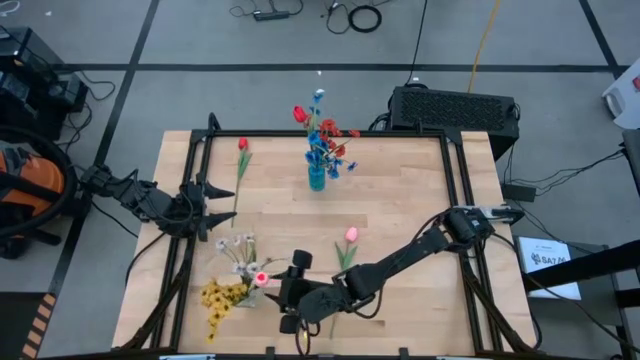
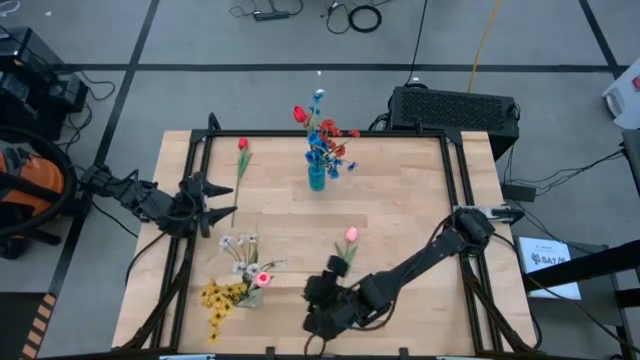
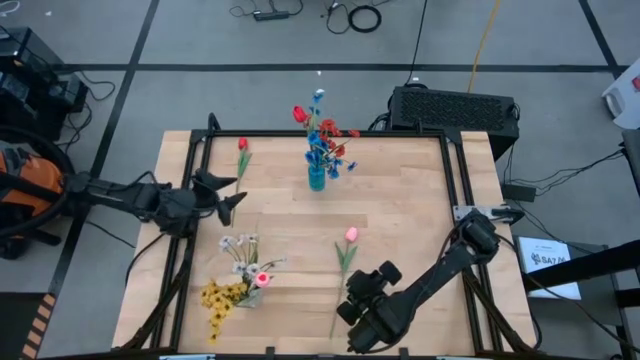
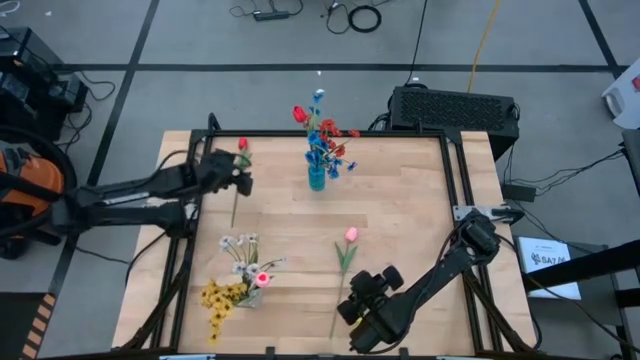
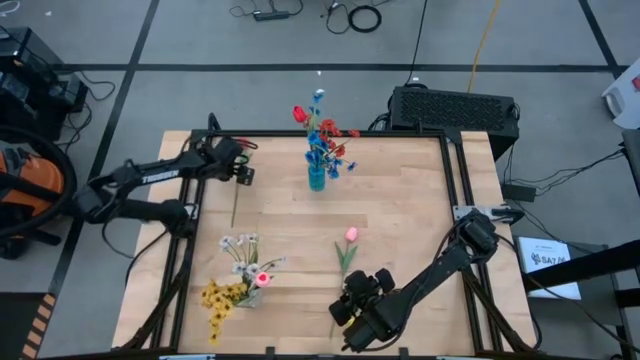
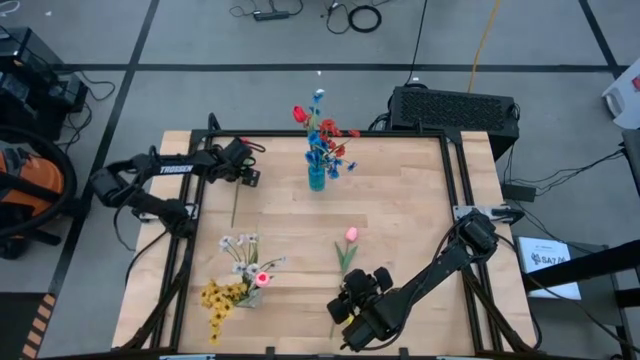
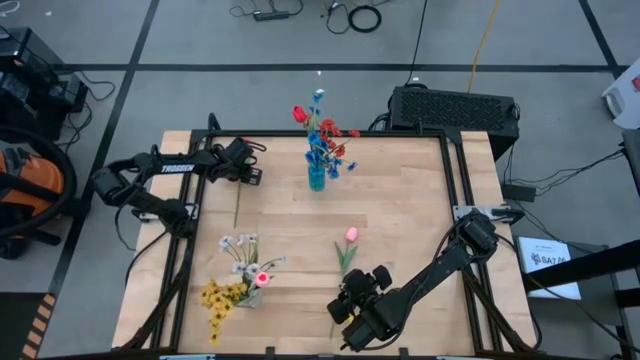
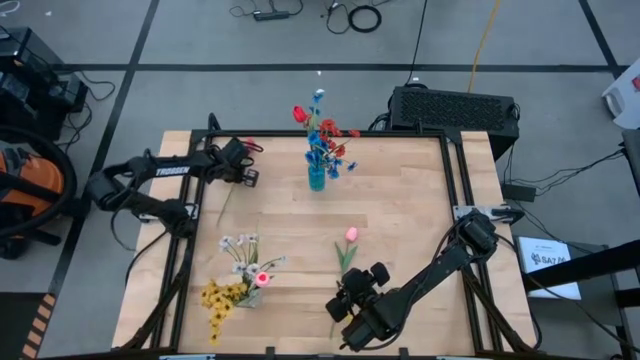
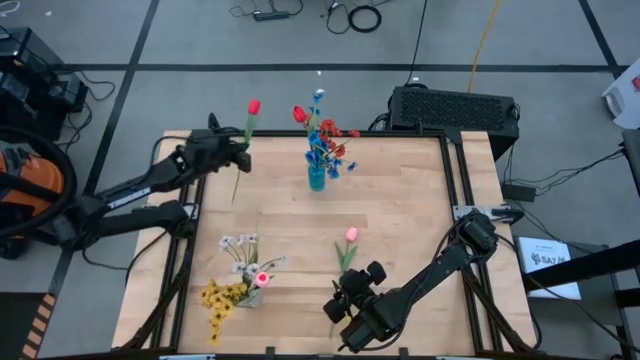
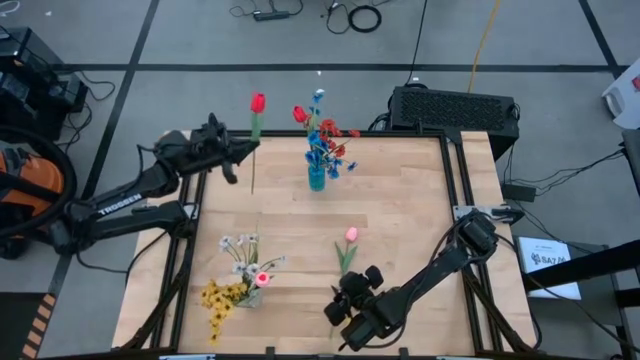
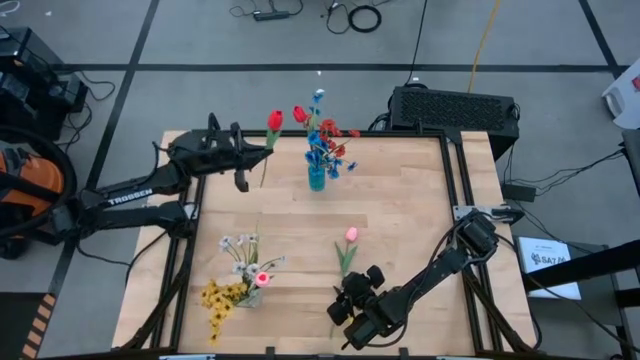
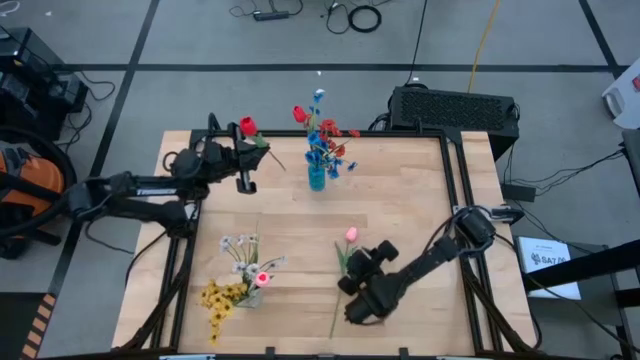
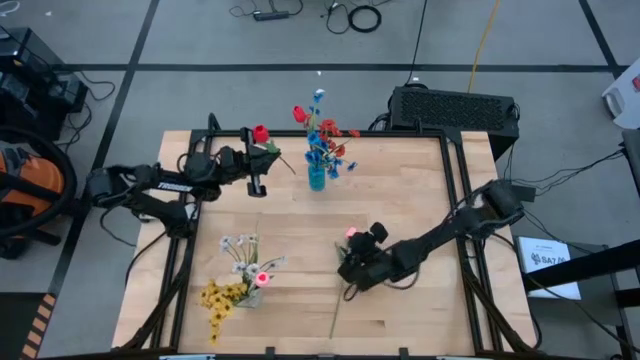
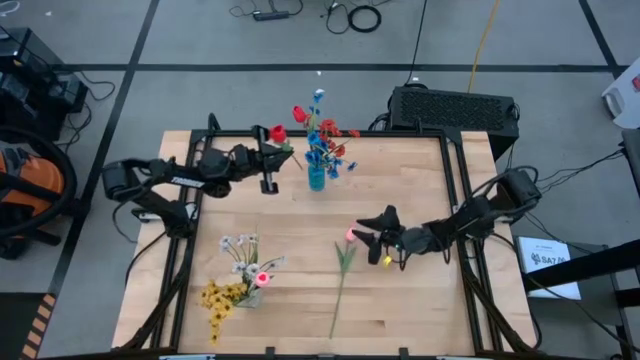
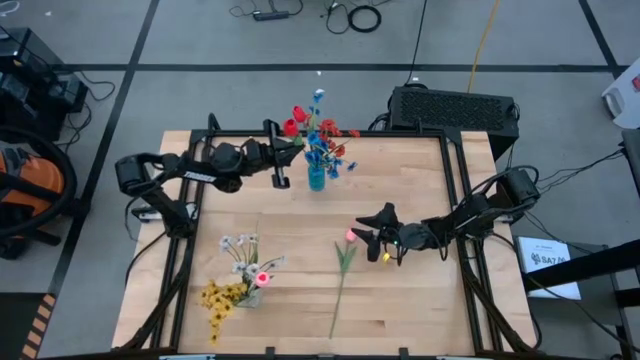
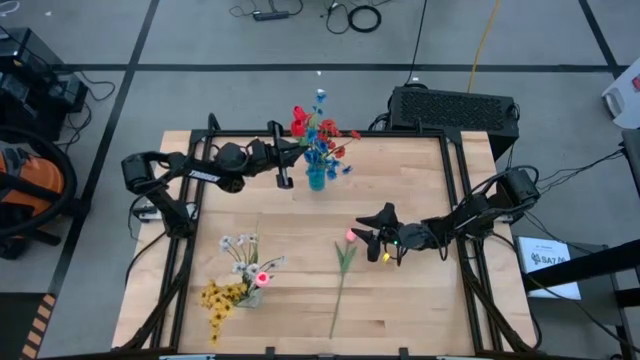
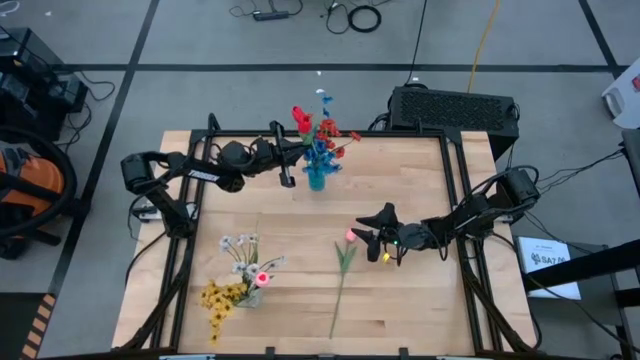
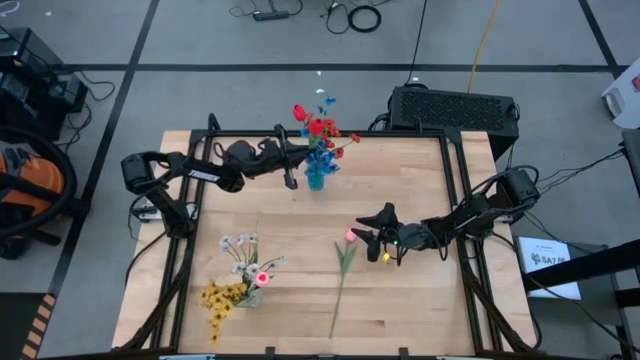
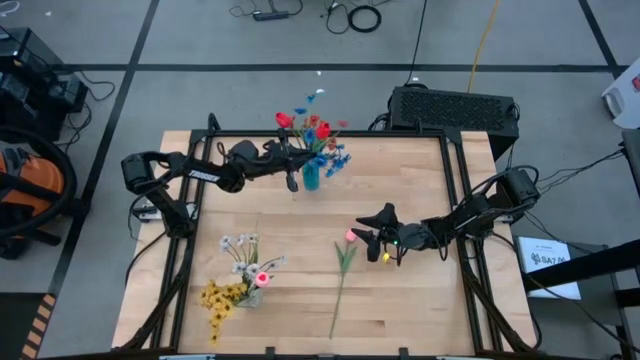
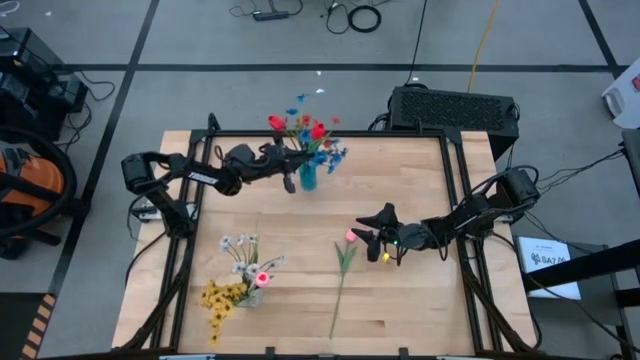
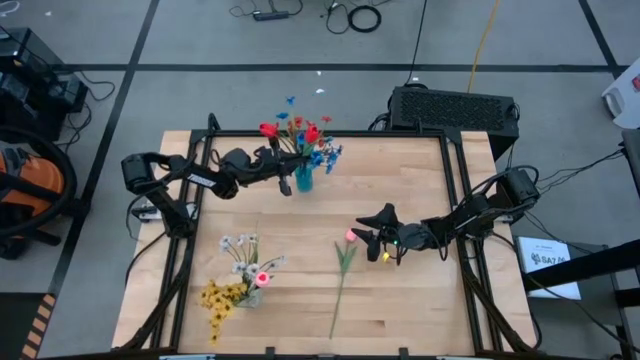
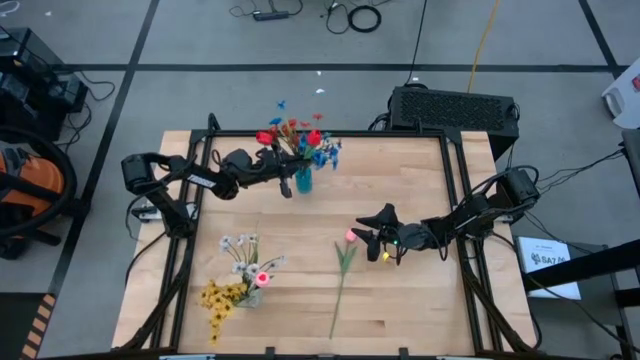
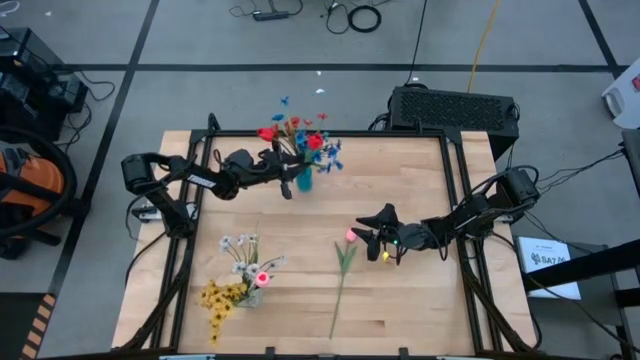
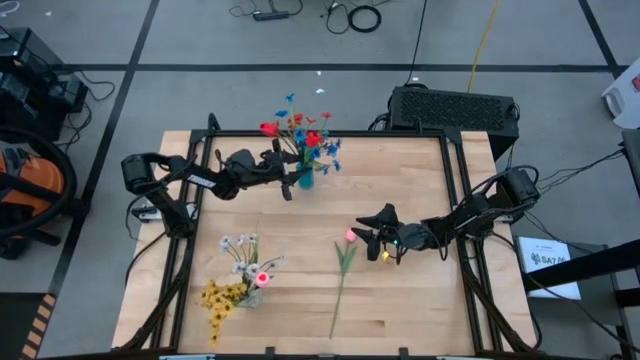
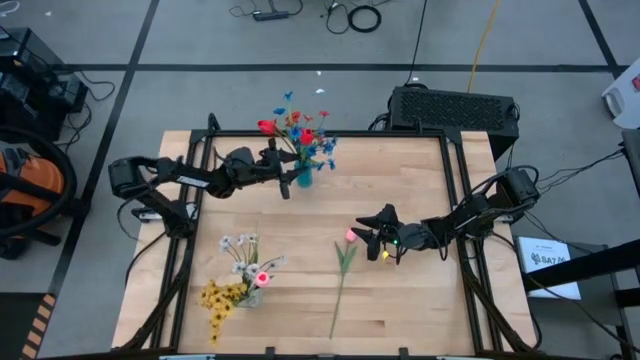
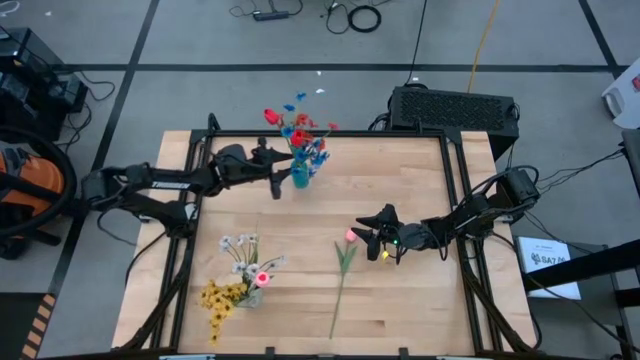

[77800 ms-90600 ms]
Task: Sort flowers into vase by color
Put the red tulip into the blue flower vase

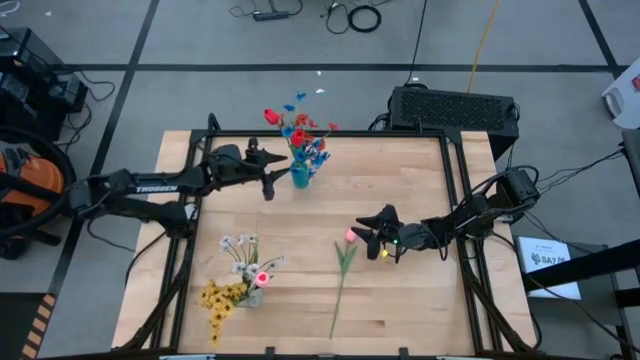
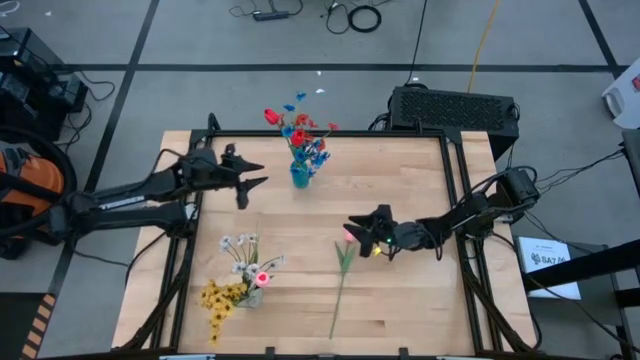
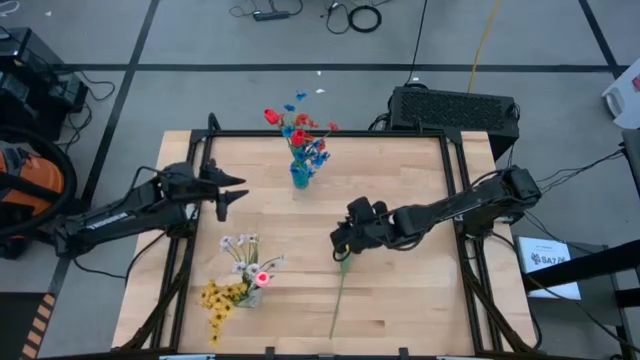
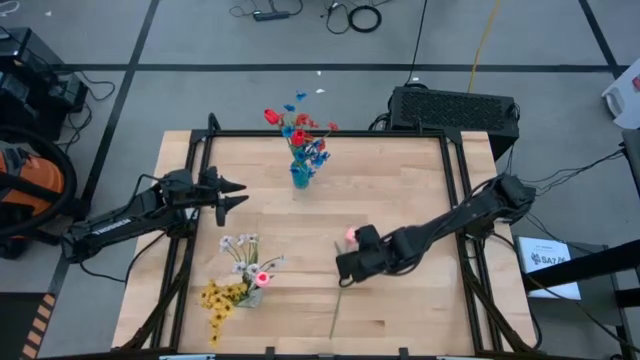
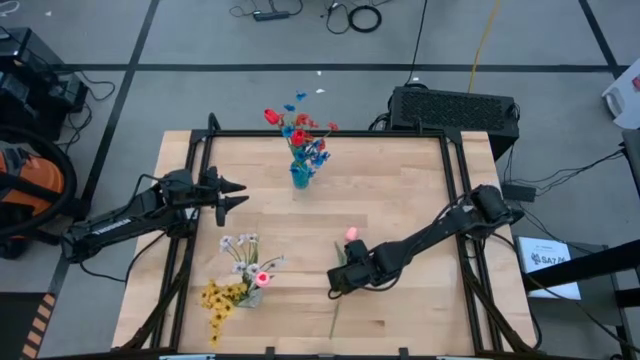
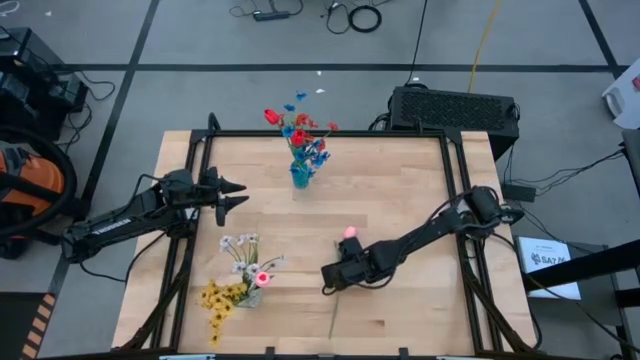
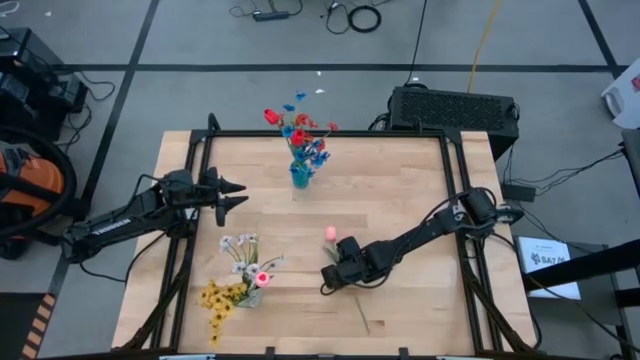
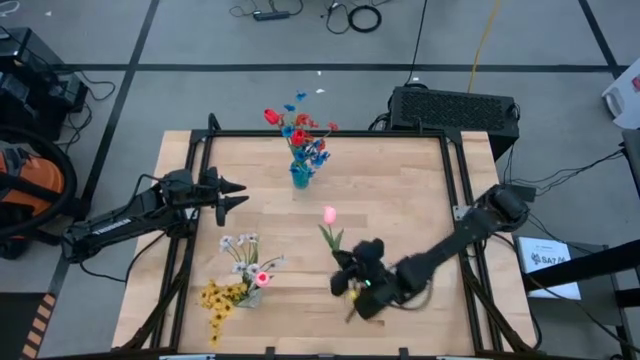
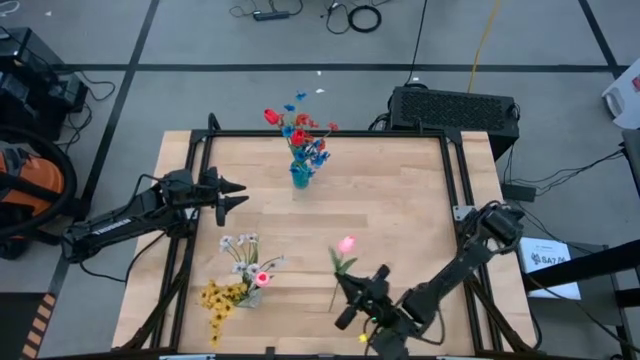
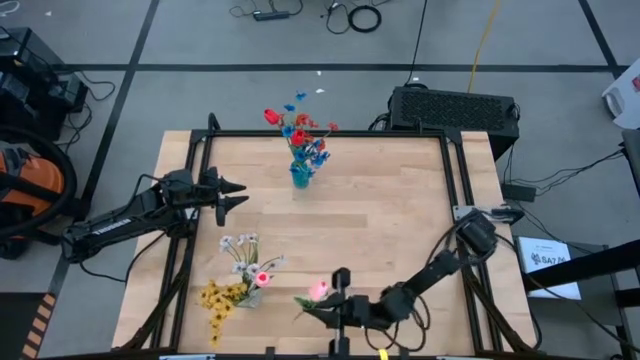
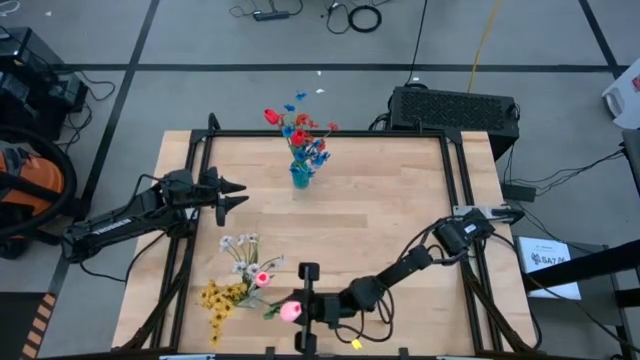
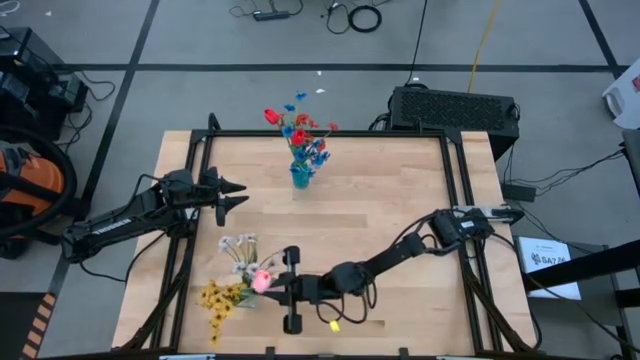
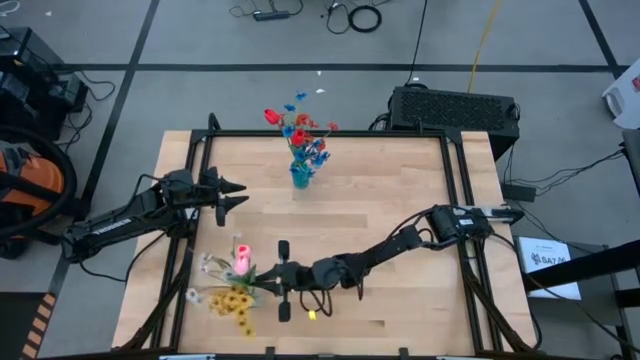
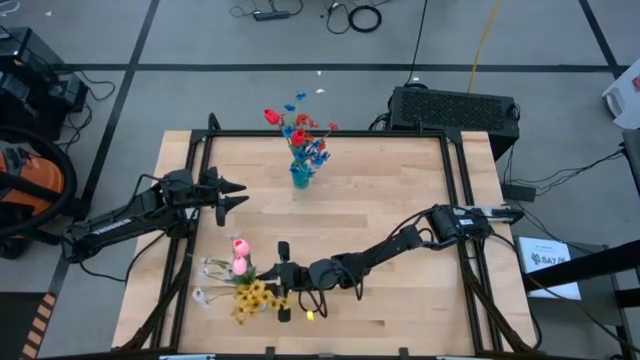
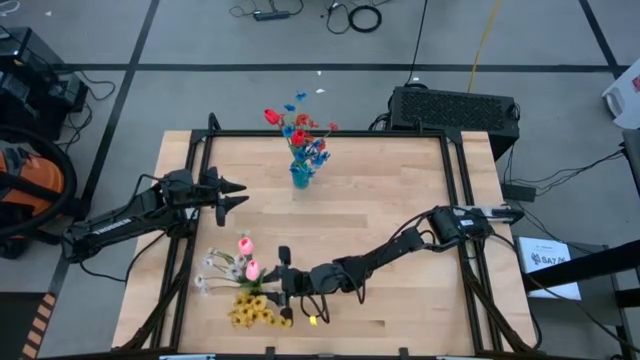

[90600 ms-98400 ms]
Put the pink tulip into the transparent flower vase

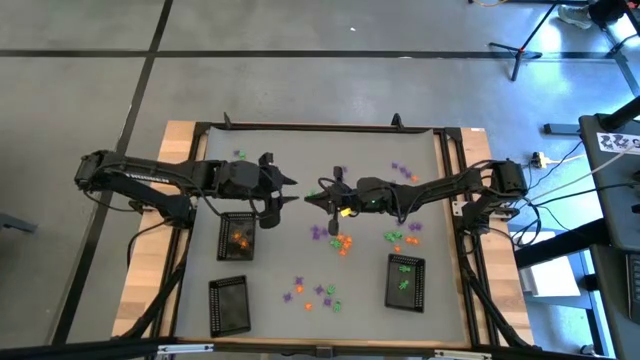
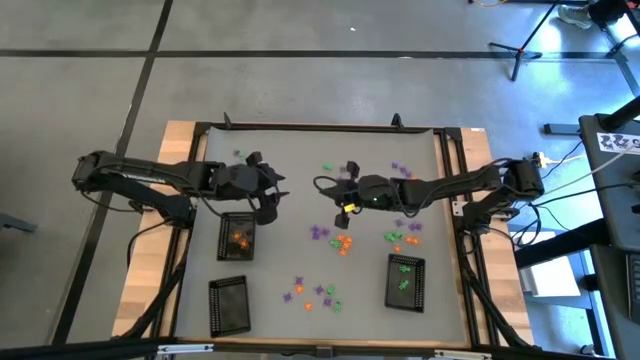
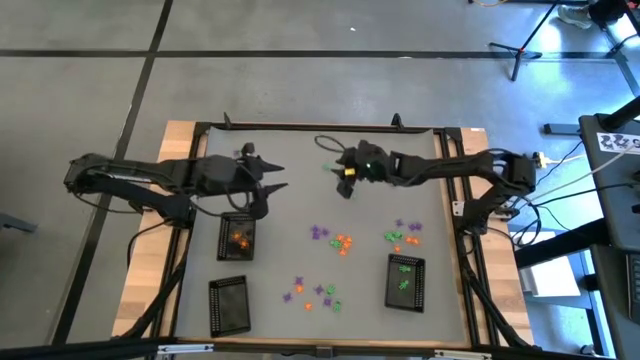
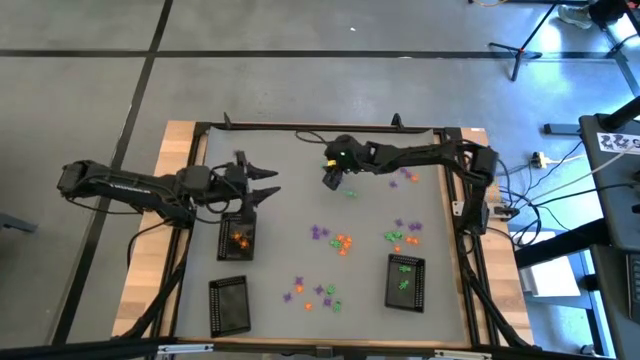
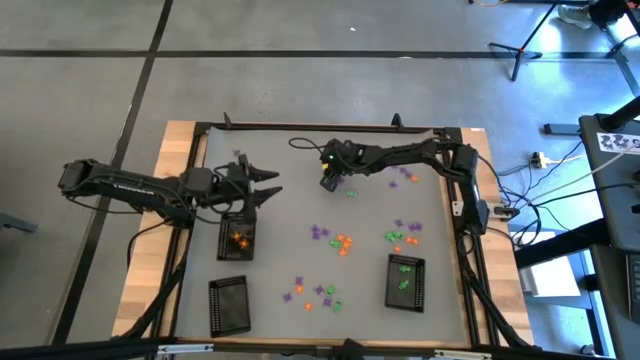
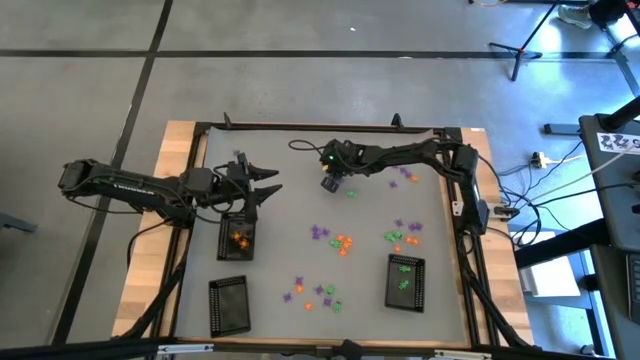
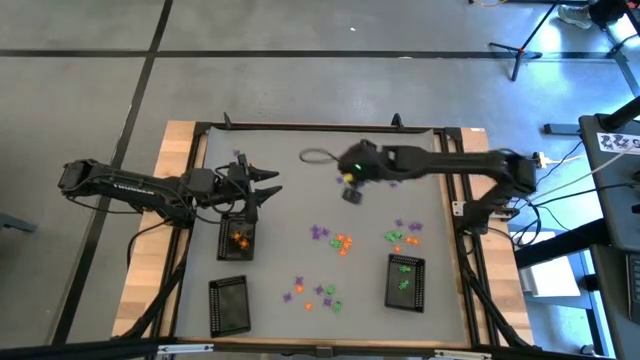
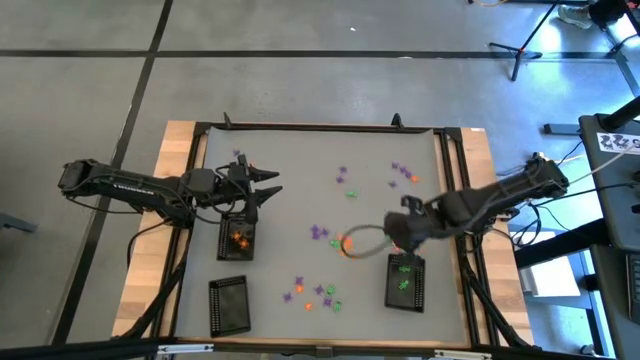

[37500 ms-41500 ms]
Task: Sort Halloween decoration
Put the green skeleton toy into the bottom right black basket
